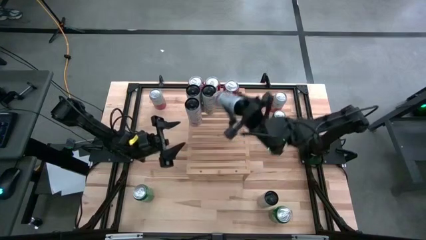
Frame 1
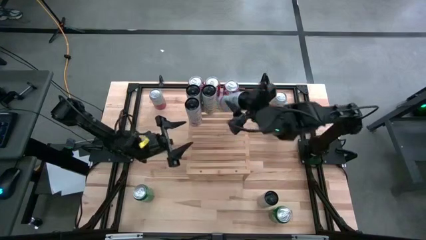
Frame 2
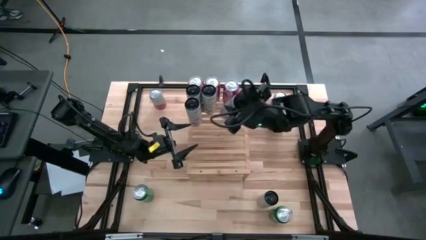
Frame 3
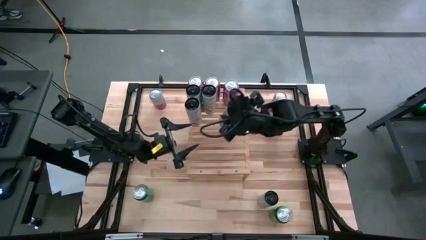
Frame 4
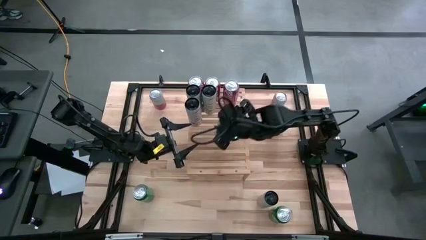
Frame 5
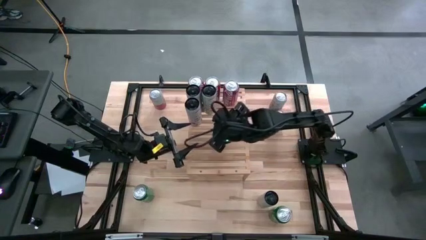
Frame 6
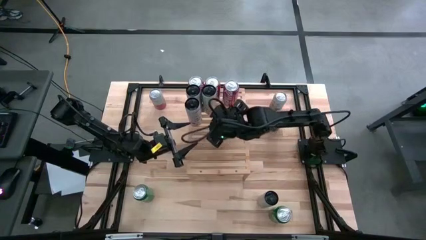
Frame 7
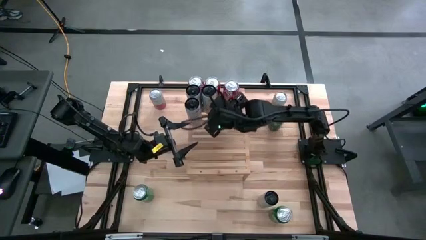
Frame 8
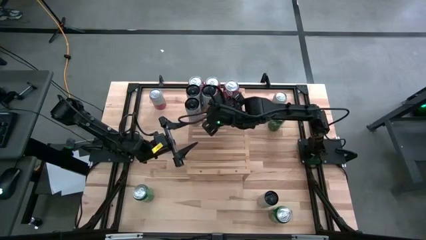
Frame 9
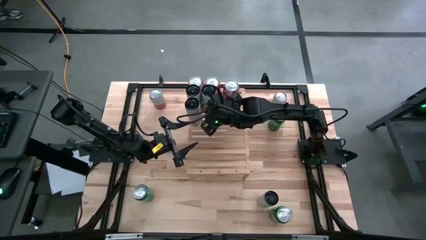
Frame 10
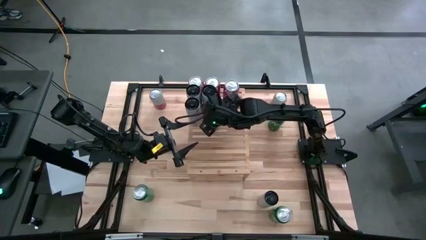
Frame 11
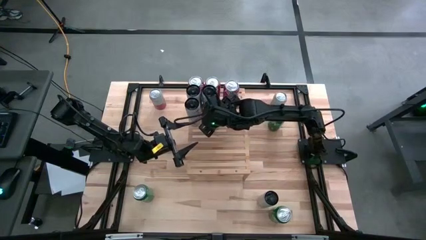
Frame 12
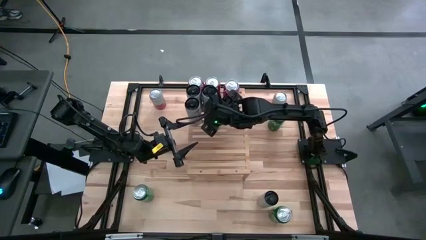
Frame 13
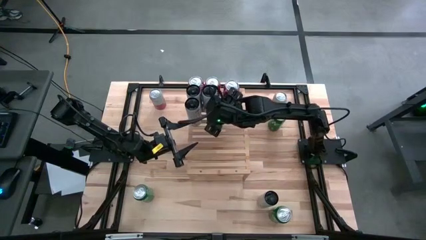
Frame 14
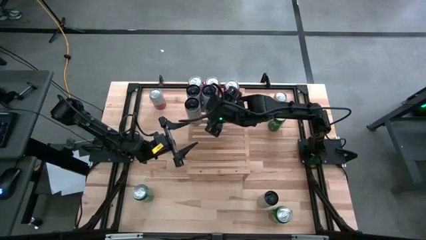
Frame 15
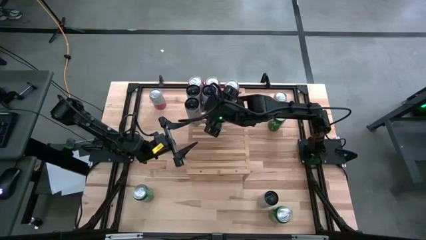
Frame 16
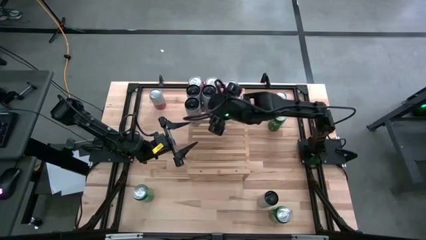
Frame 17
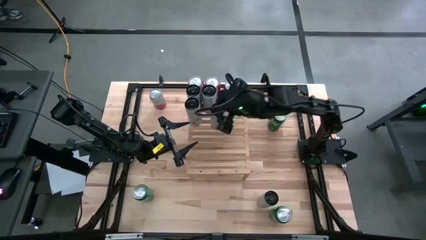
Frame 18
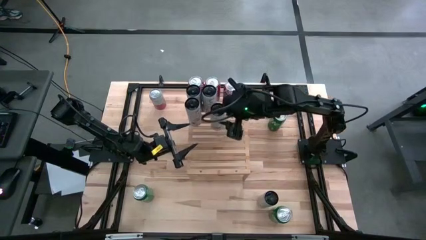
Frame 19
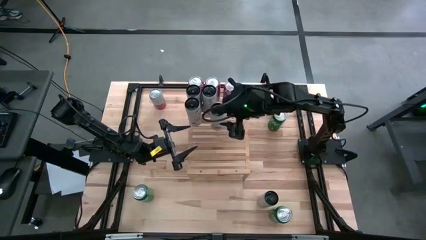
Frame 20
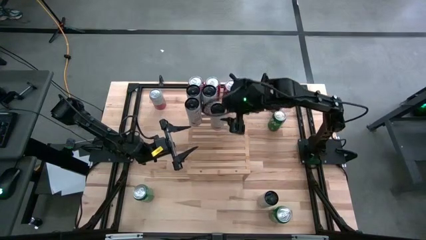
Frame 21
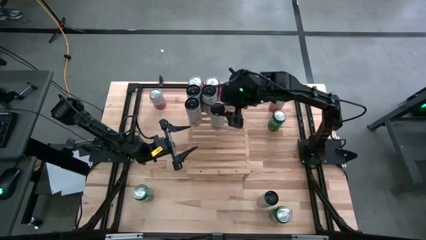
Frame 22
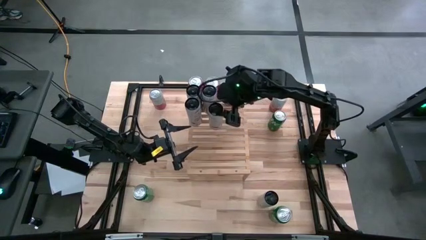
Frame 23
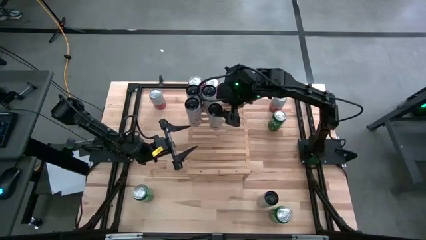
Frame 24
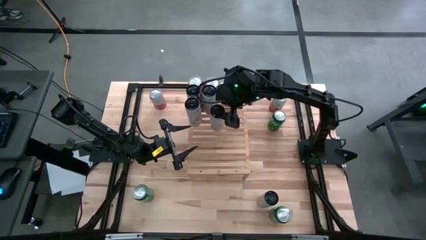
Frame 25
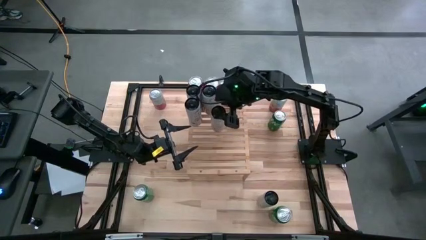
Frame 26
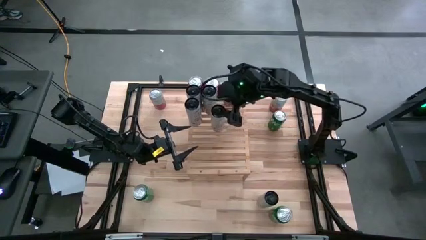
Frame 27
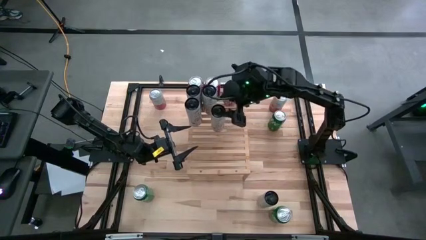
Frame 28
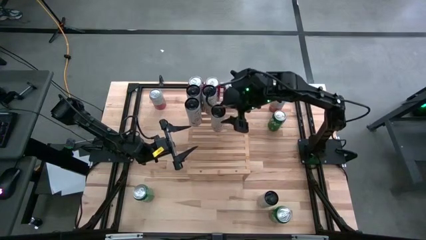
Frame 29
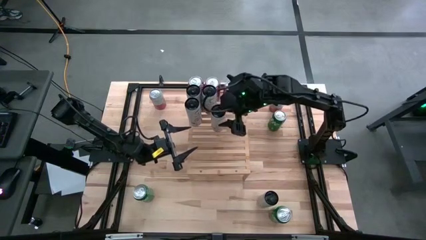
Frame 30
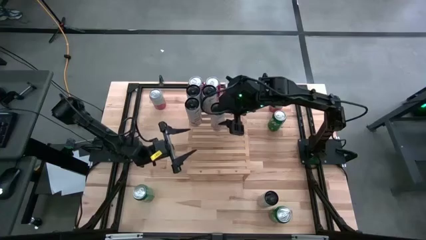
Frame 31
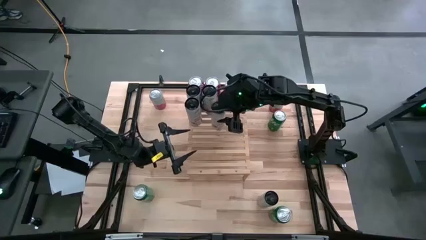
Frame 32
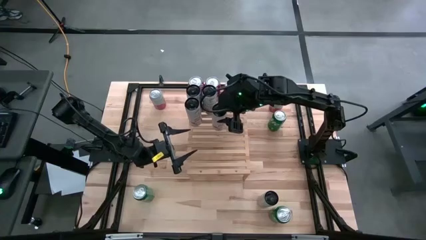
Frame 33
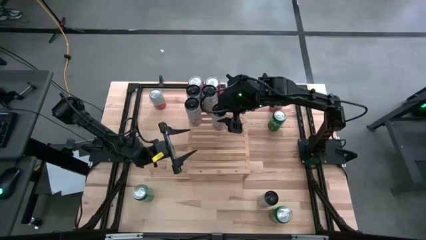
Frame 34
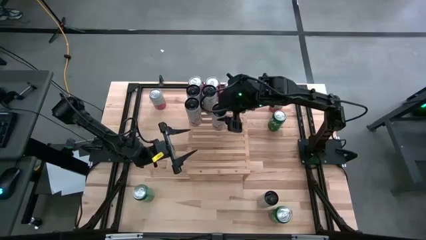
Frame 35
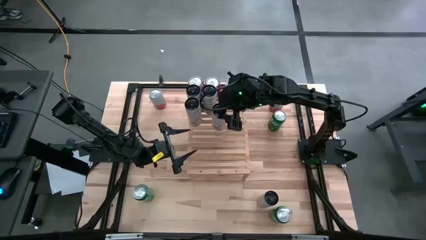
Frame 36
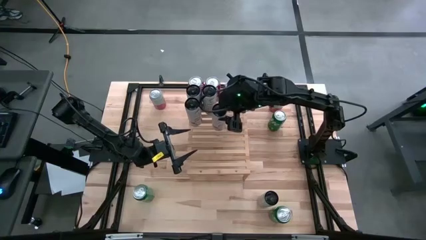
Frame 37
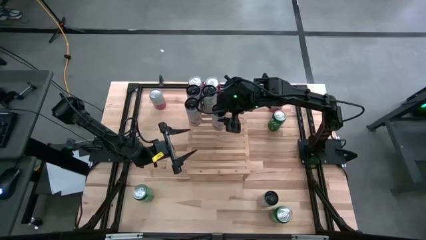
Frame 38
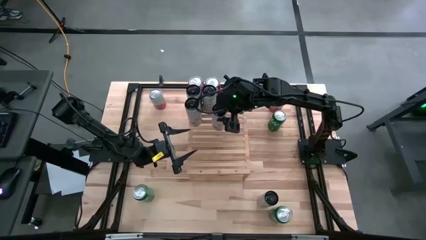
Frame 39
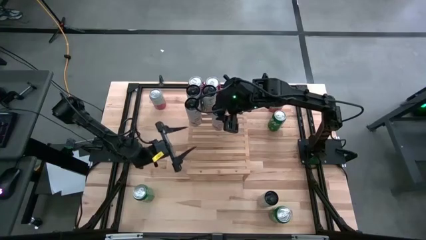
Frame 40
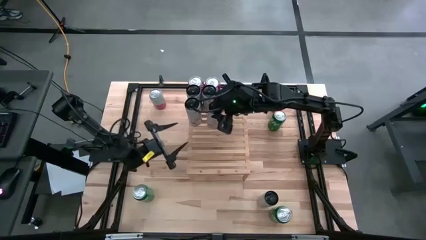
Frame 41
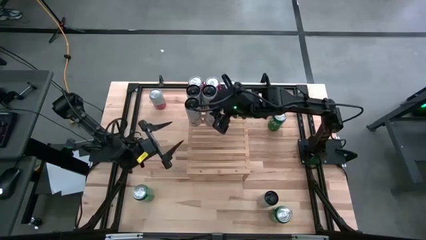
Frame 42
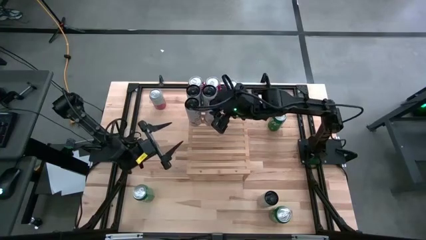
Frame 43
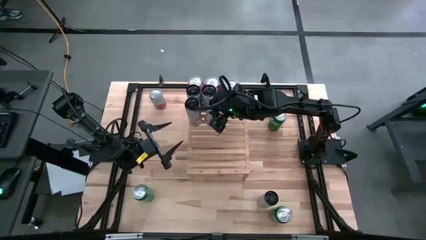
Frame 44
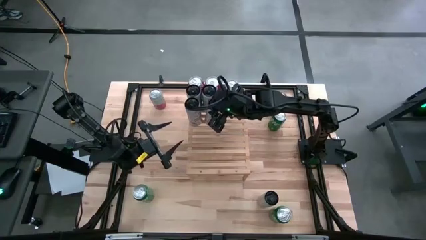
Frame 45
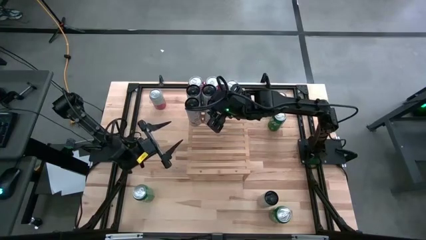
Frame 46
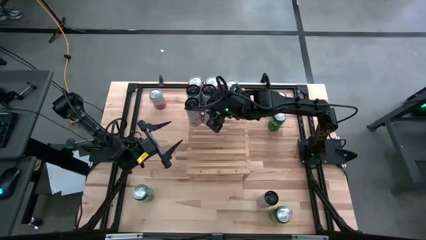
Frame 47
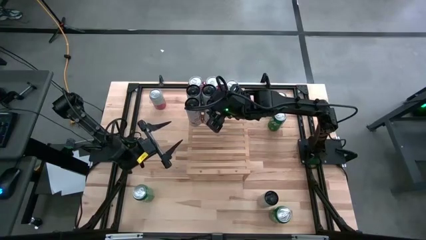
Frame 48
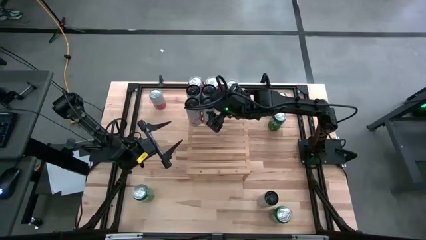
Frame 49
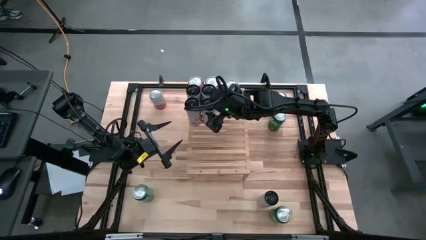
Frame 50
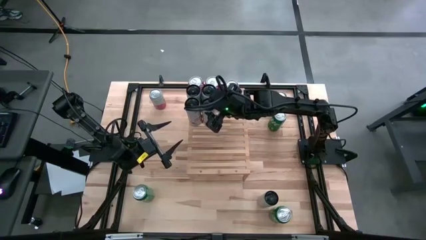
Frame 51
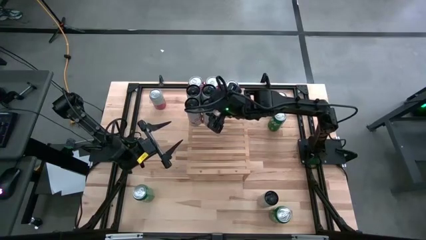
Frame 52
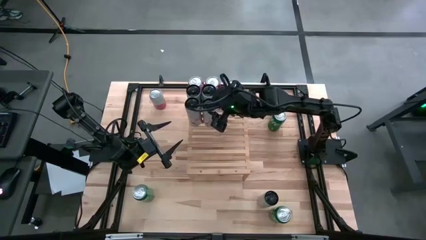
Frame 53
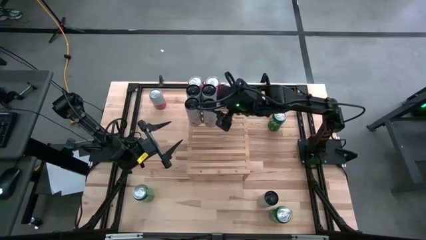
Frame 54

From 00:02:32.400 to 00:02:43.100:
Task: Place canned beverage on shelf
Align the right peach vibe celsius soda can with the other peach vibe celsius soda can on the shelf

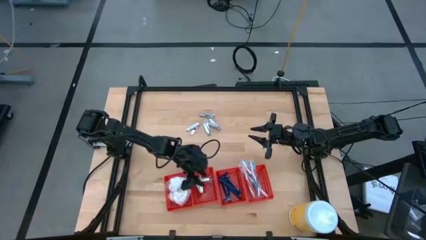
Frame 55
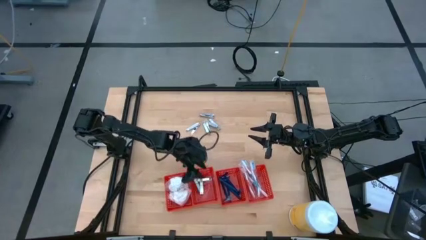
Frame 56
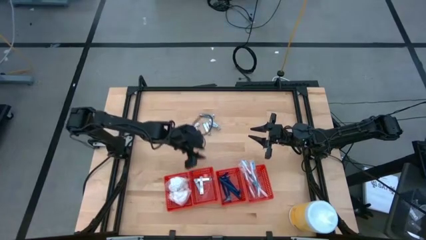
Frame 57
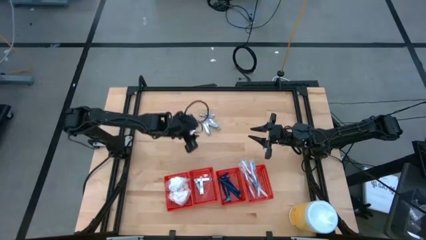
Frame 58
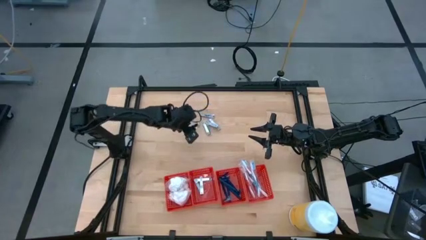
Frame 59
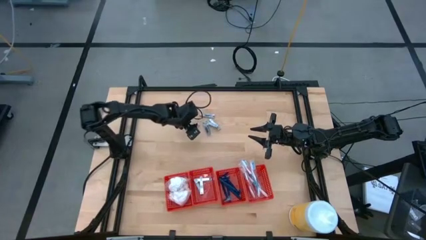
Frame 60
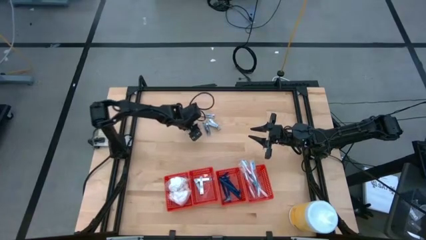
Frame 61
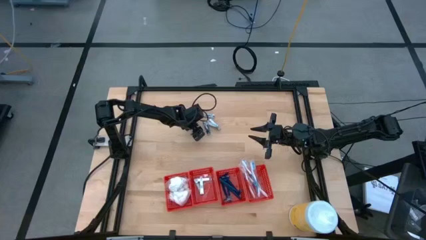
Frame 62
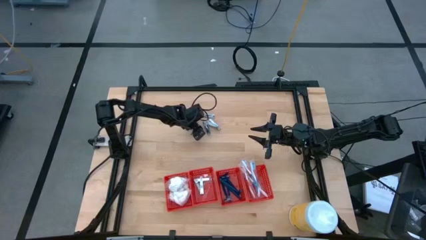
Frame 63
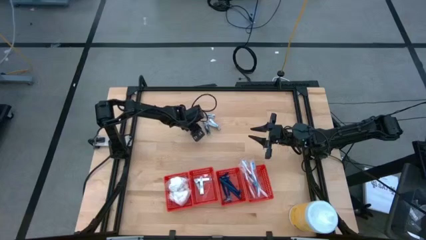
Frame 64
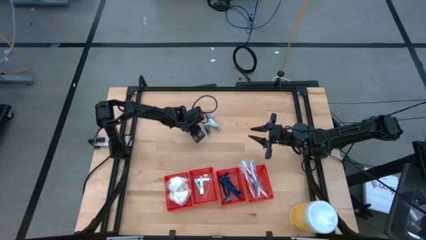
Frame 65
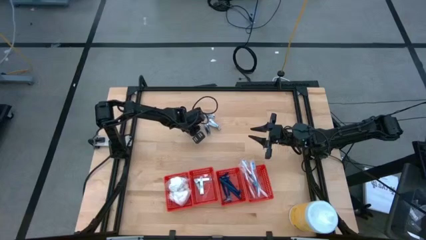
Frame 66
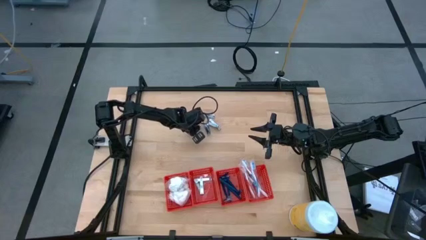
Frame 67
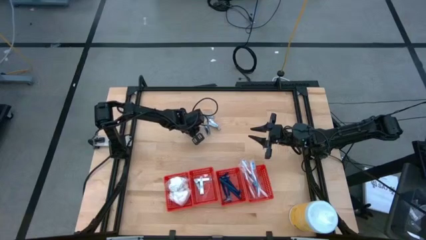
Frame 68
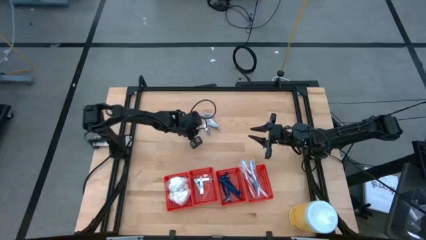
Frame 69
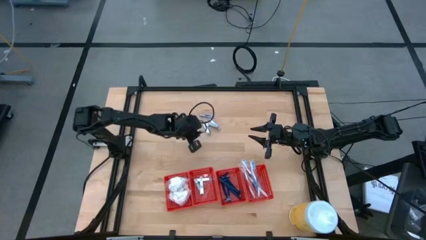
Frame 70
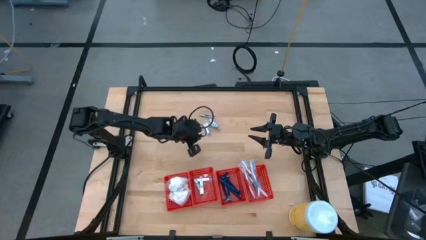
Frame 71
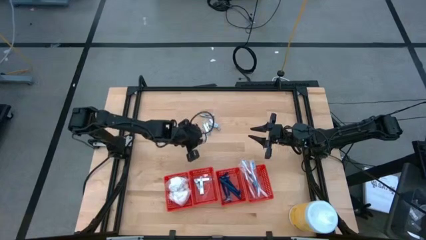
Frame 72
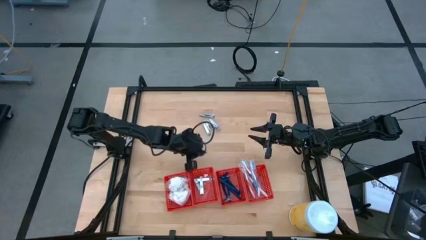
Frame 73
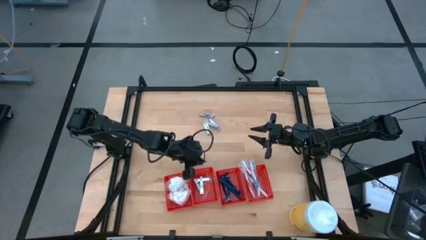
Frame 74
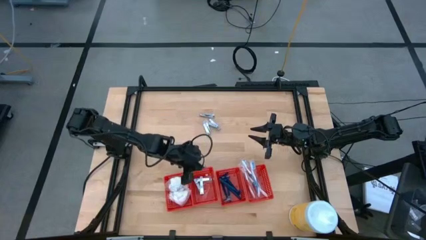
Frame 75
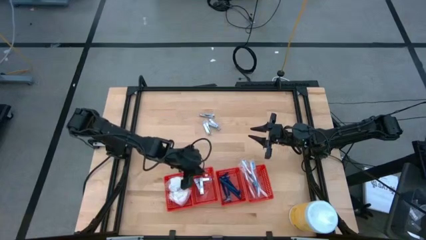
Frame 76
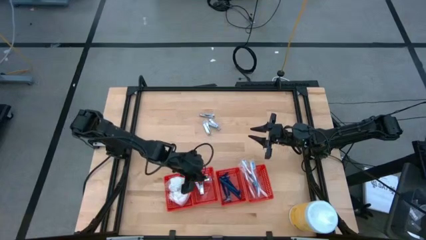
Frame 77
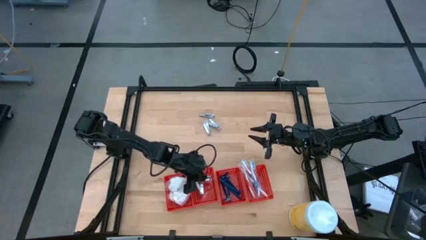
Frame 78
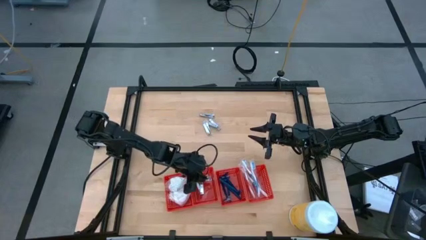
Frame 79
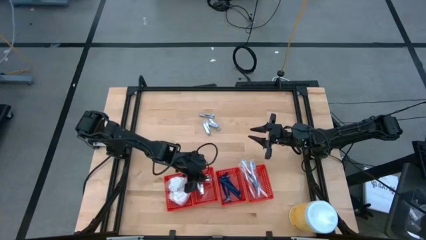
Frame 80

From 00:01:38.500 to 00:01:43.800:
Task: Pick & Place Travel size toiletries
Put the silver nail cutter into the middle left red bin
